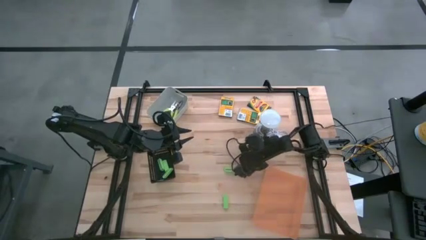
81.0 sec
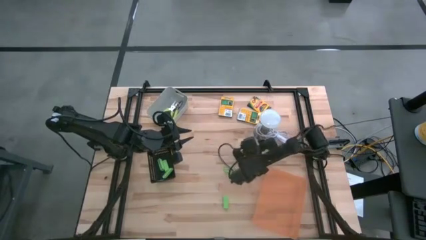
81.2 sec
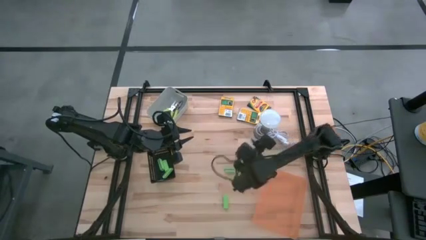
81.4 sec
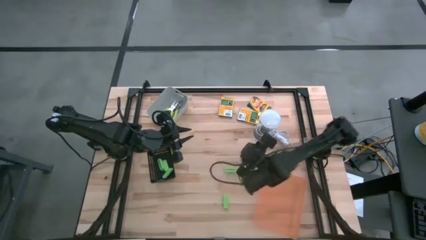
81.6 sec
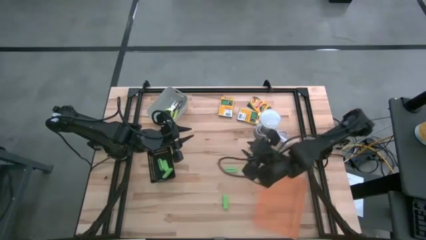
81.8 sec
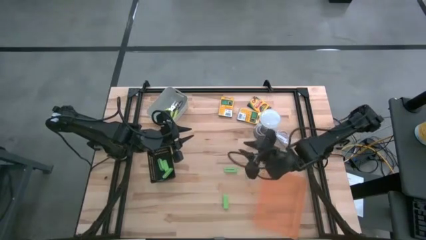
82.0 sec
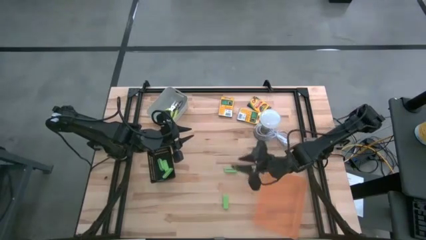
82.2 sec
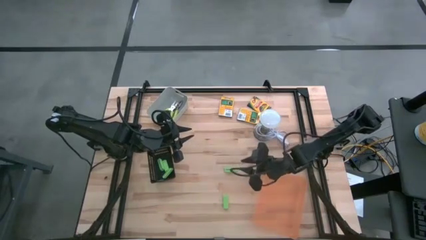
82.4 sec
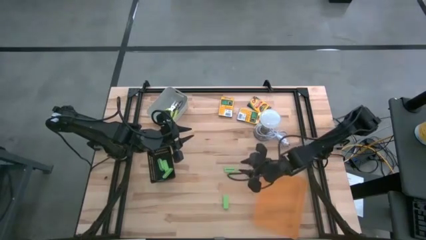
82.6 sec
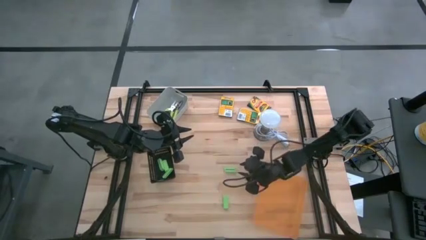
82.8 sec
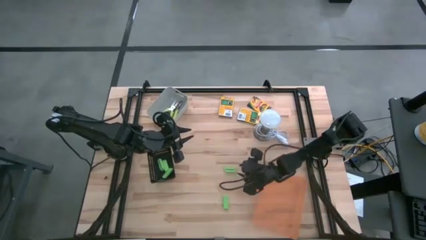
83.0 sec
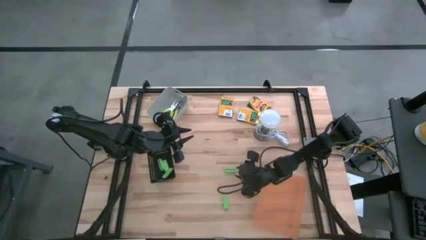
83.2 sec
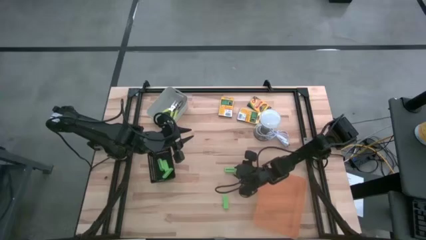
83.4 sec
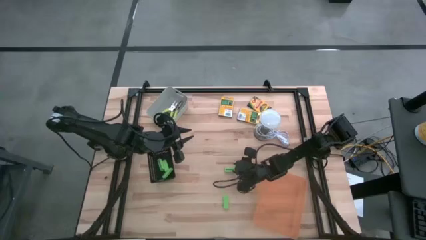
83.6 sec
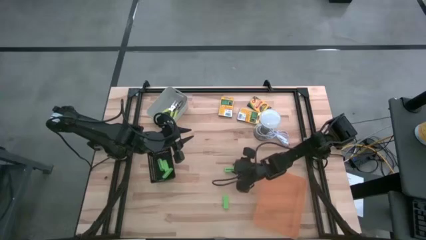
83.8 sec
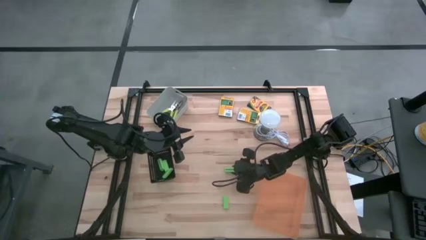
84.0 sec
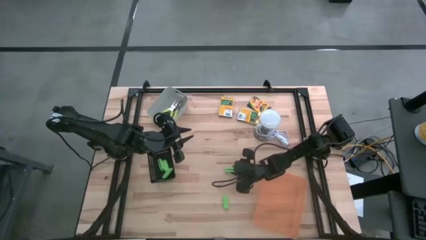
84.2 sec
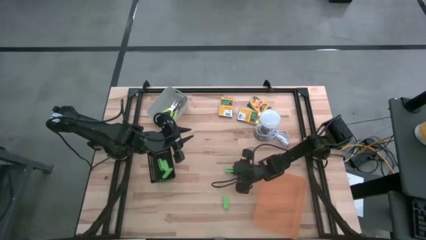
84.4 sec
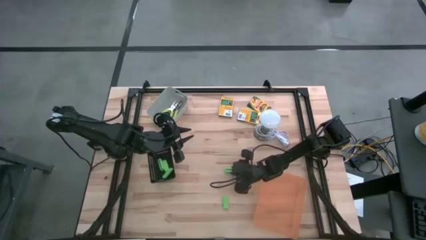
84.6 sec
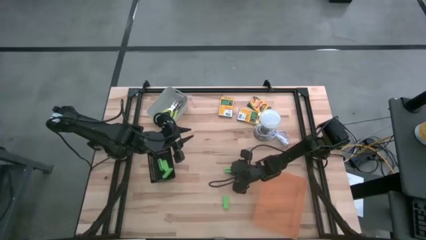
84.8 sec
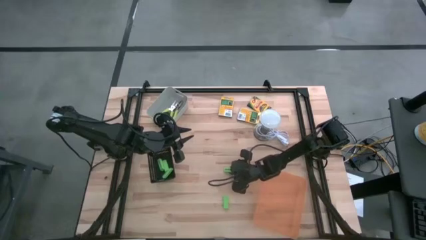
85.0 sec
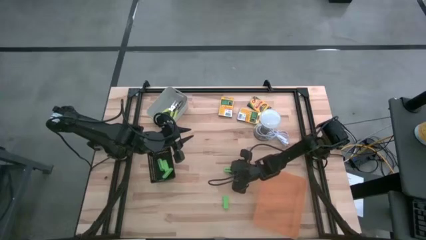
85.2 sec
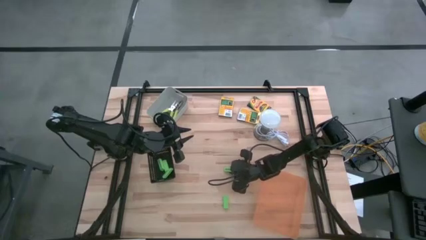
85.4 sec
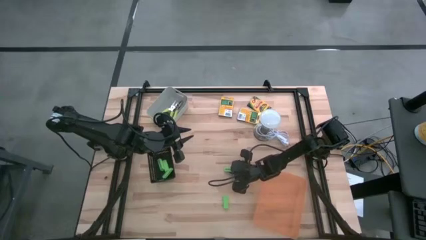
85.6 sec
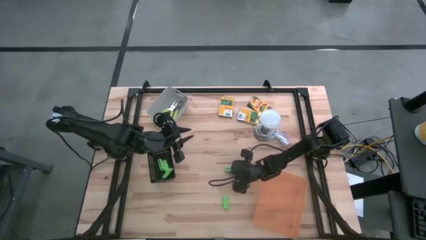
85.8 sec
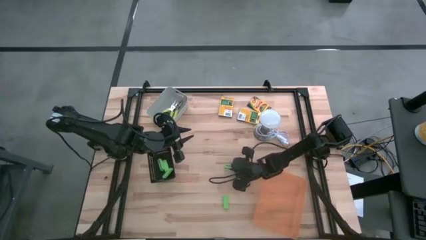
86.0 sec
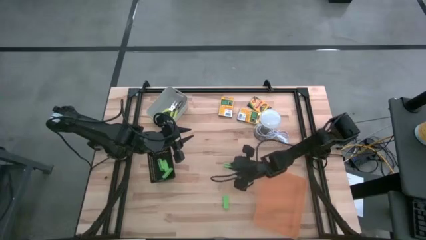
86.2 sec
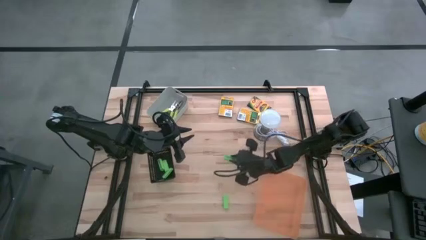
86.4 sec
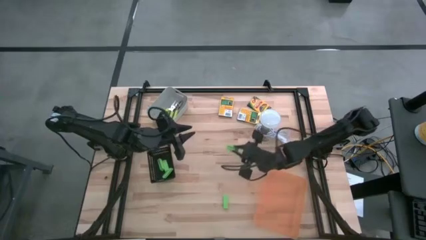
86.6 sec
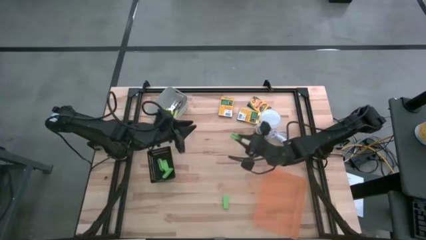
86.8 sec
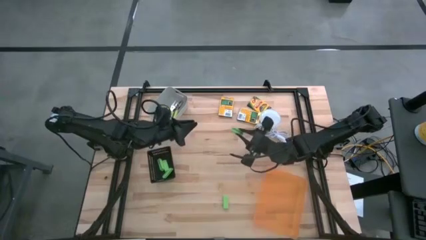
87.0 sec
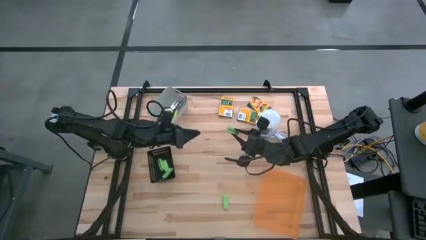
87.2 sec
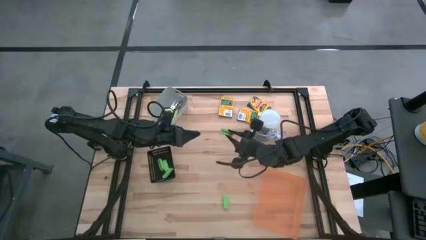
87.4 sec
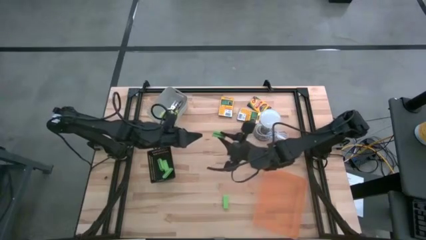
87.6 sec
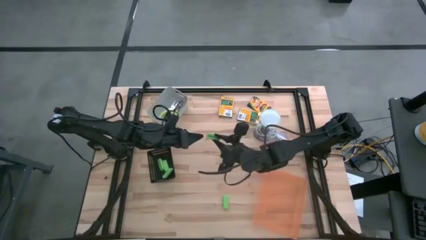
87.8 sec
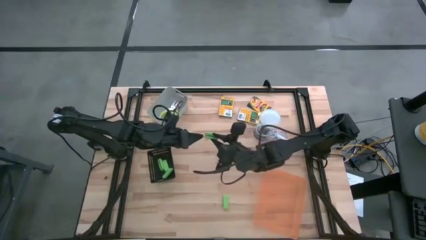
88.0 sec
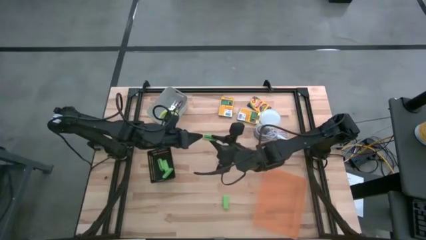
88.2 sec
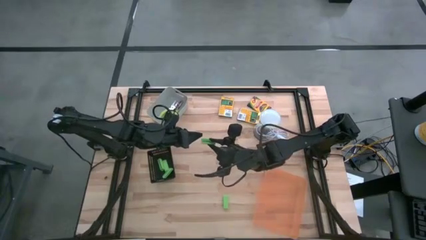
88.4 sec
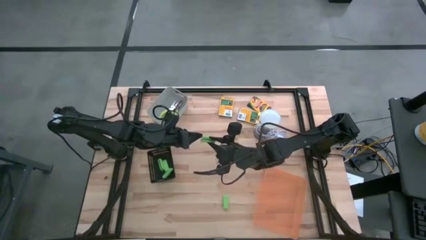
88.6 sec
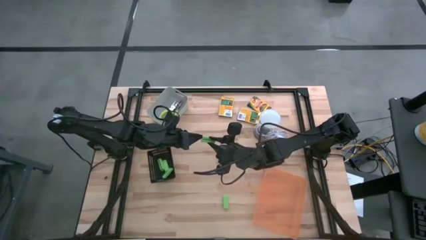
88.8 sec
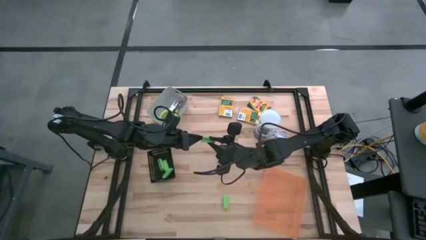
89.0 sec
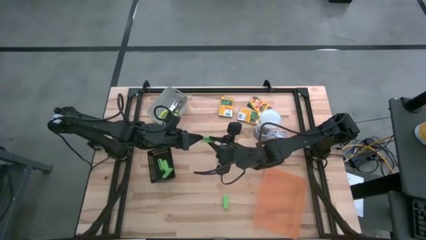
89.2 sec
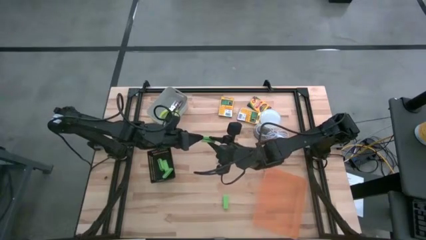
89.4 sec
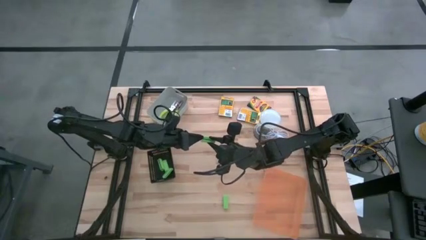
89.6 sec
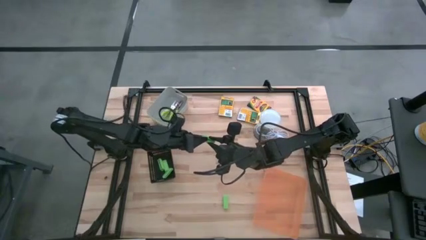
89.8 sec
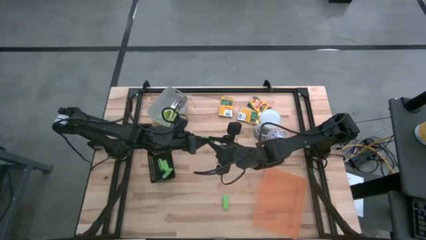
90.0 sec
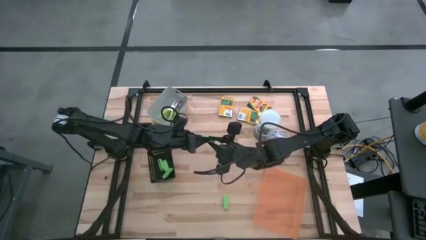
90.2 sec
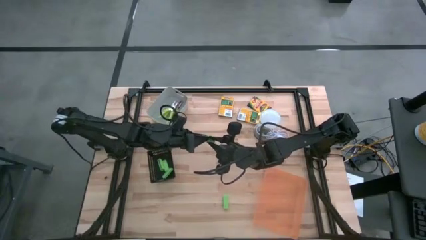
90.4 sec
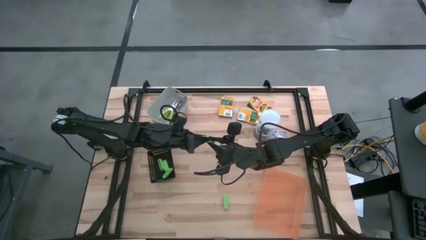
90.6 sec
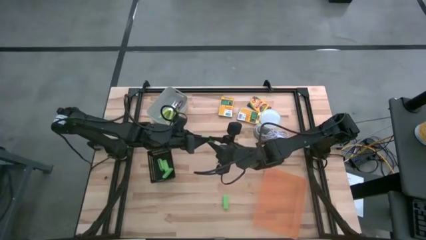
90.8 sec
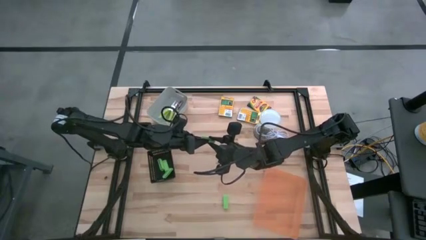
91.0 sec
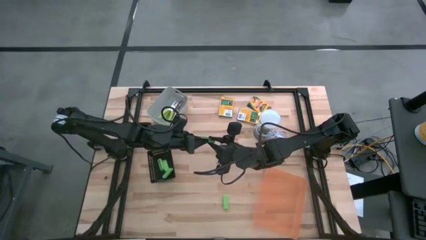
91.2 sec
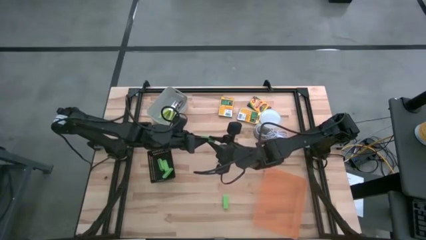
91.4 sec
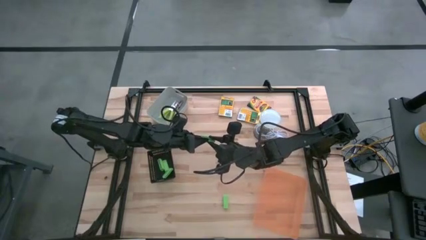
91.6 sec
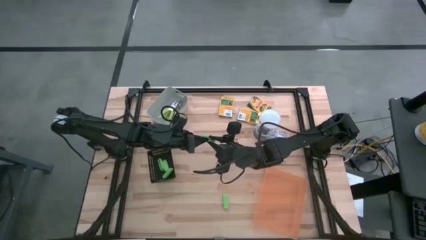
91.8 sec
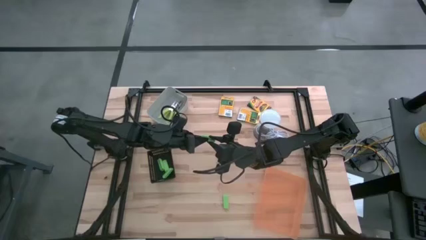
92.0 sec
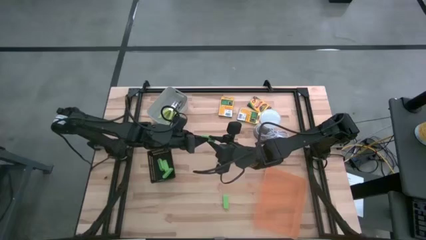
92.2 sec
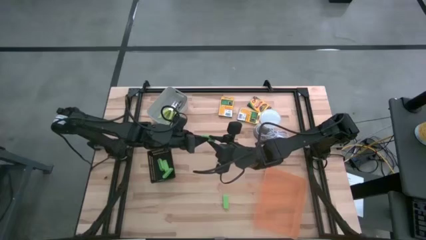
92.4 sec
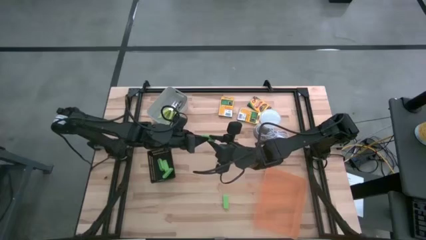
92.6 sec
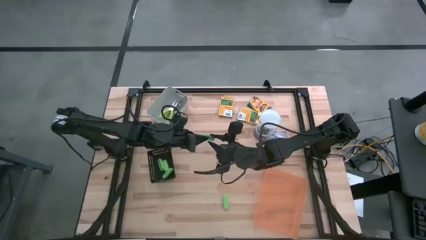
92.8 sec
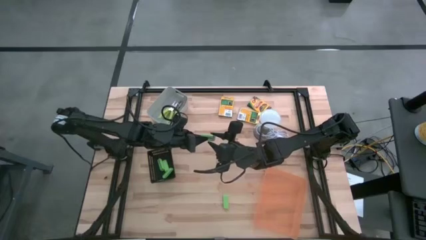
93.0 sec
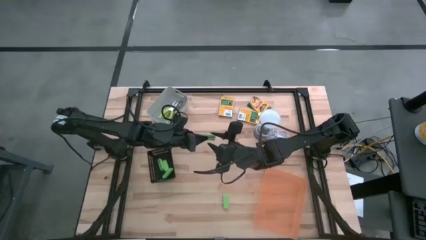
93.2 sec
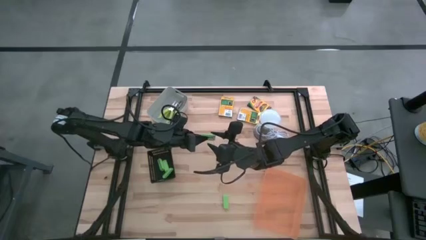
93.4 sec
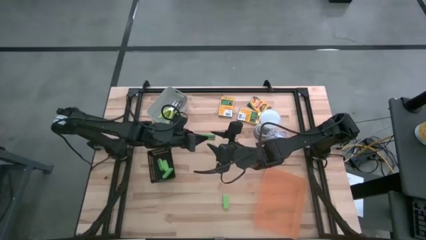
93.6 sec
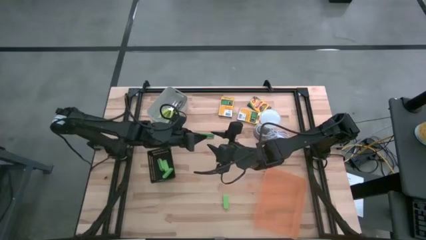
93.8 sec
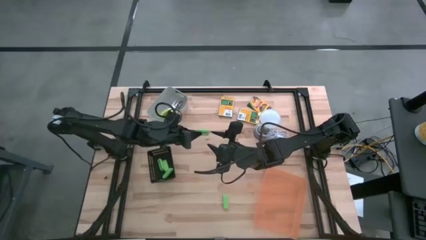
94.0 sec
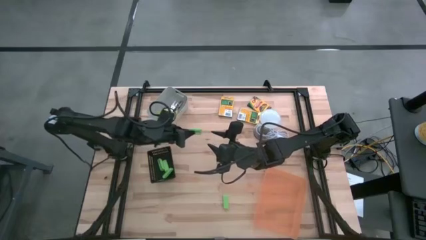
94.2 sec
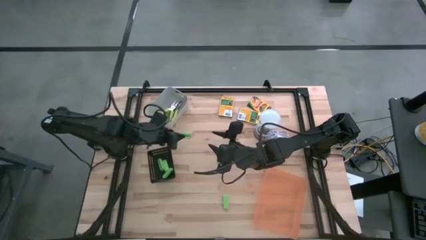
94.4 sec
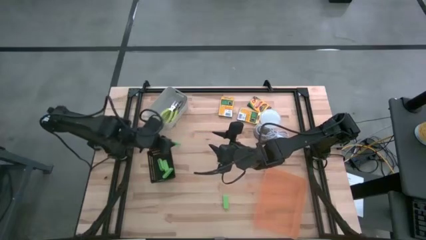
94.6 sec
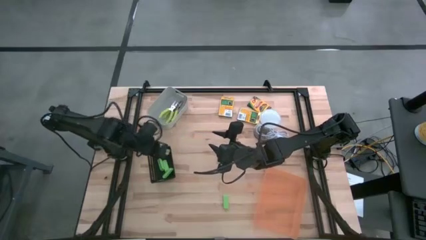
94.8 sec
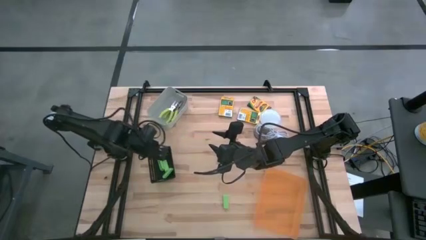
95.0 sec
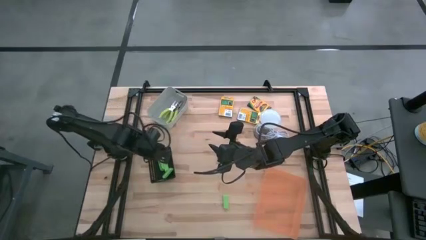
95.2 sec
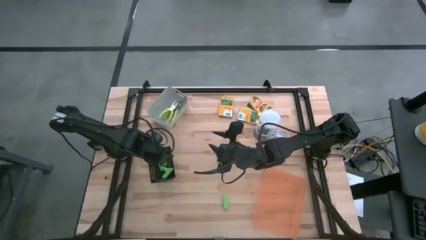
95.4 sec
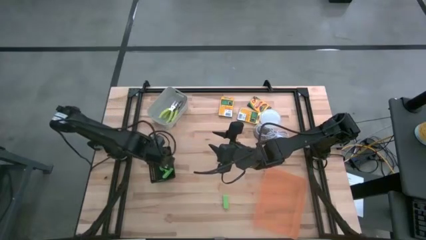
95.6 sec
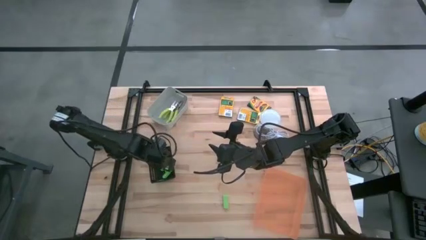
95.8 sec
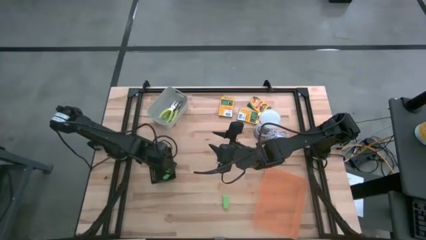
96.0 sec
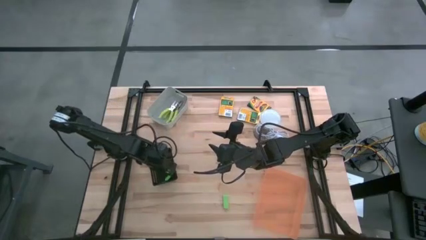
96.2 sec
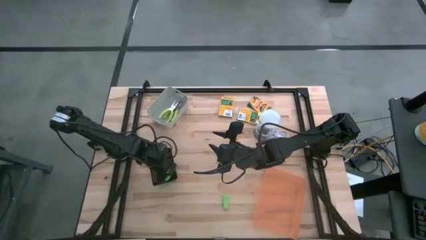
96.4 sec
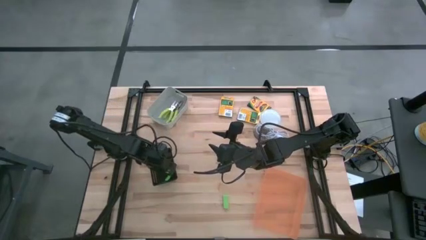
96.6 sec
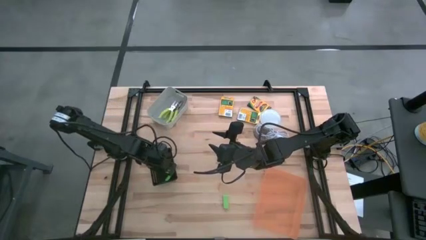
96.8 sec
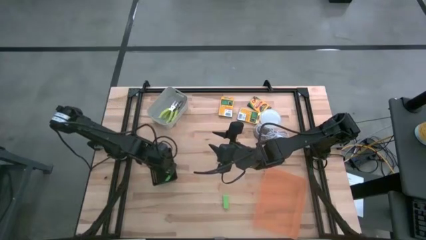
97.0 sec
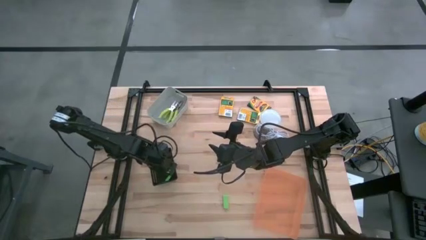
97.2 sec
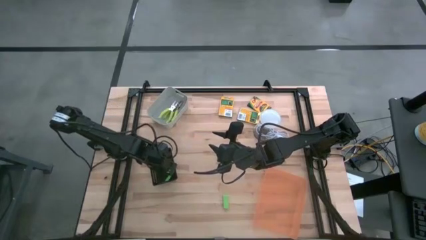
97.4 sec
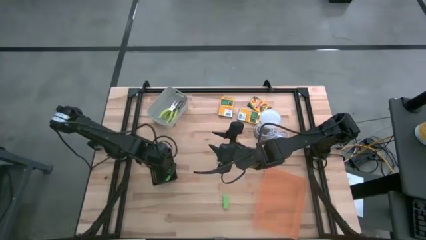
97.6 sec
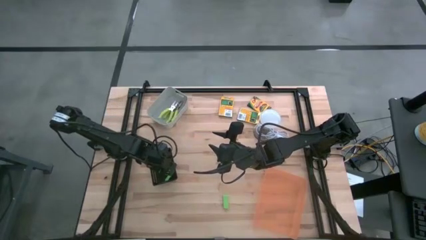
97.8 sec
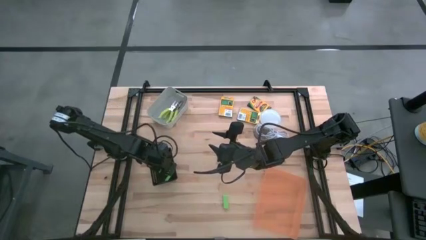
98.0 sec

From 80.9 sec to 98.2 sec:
Task: Pick & Place School Supplies
Put the green eraser into the black bin
